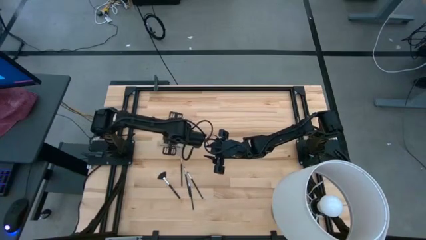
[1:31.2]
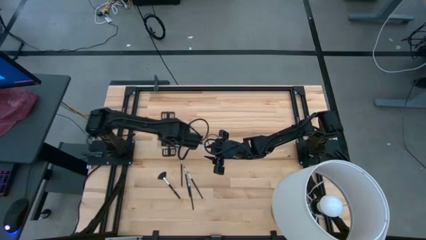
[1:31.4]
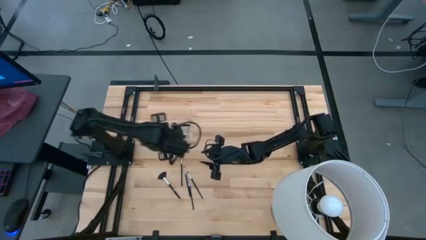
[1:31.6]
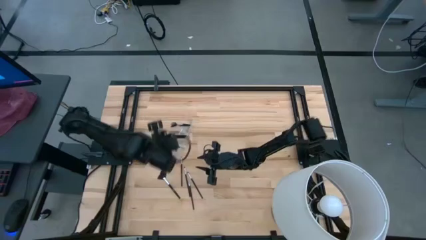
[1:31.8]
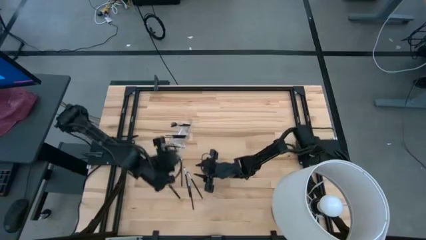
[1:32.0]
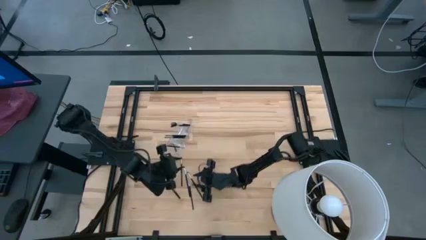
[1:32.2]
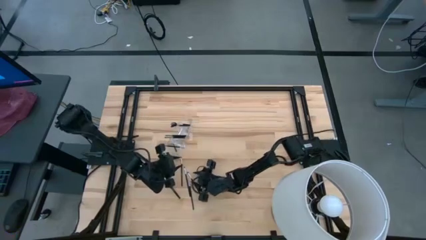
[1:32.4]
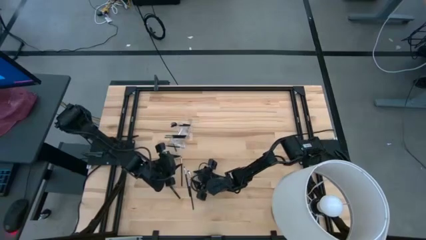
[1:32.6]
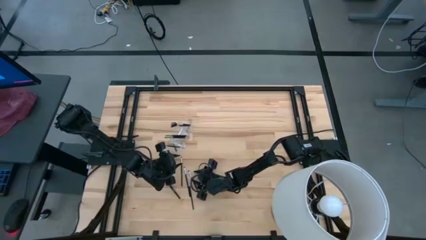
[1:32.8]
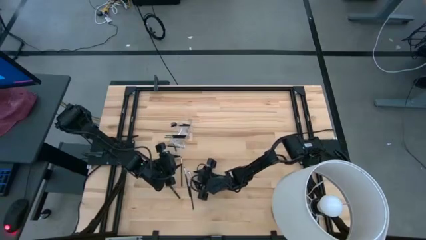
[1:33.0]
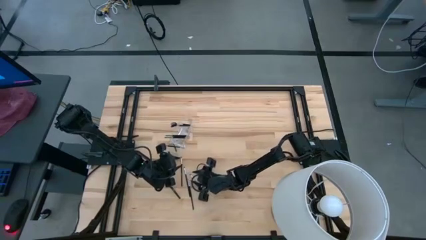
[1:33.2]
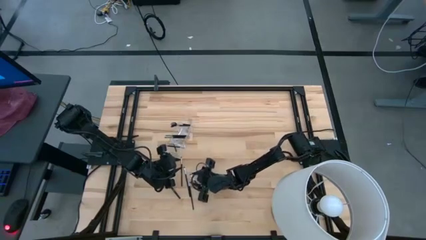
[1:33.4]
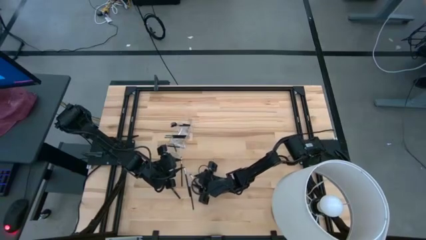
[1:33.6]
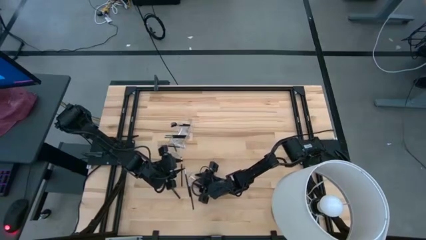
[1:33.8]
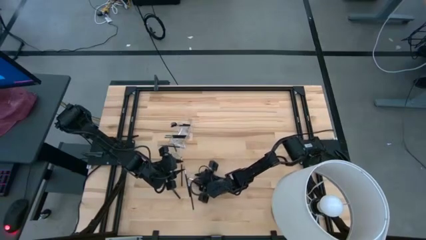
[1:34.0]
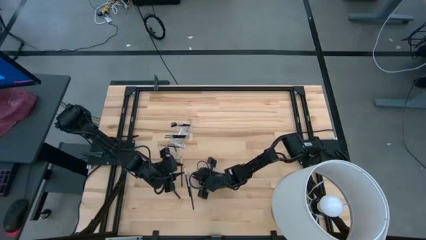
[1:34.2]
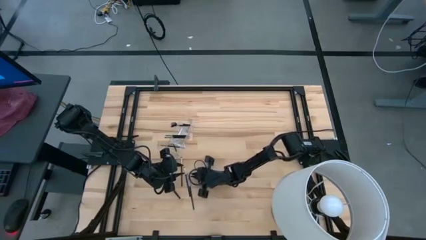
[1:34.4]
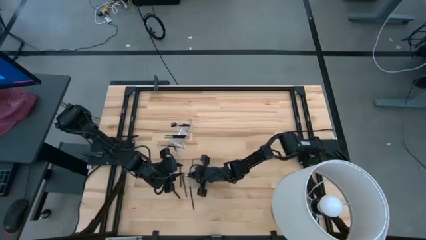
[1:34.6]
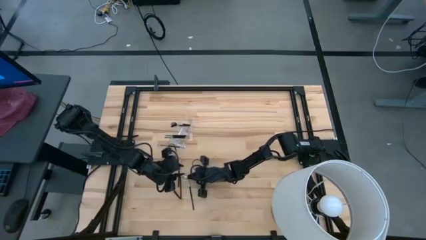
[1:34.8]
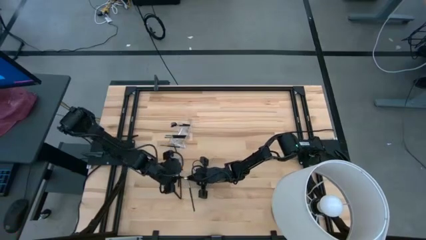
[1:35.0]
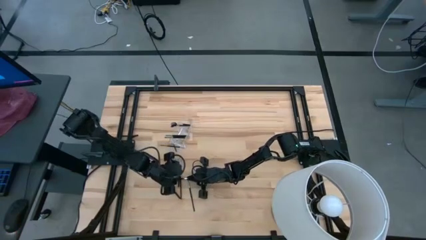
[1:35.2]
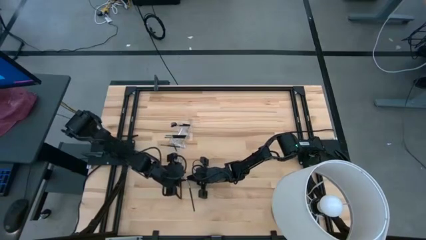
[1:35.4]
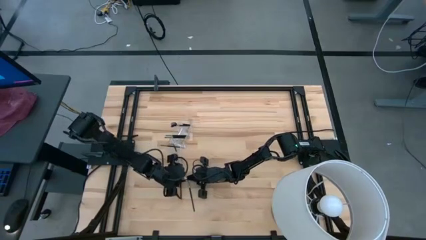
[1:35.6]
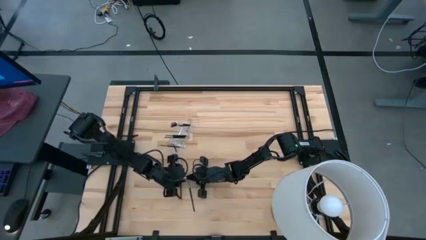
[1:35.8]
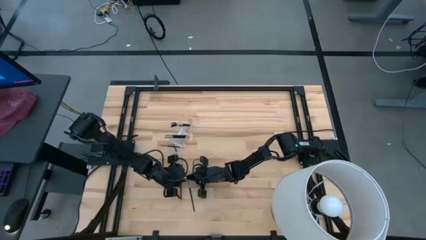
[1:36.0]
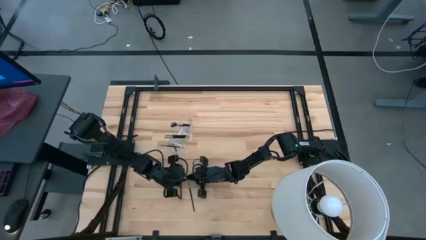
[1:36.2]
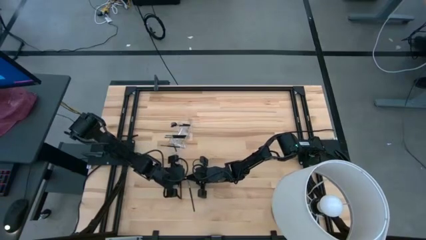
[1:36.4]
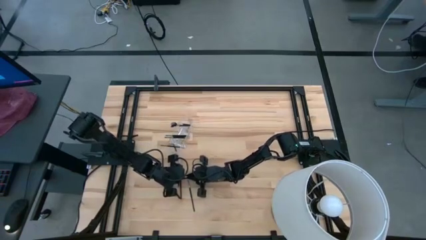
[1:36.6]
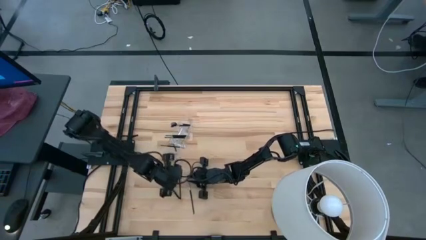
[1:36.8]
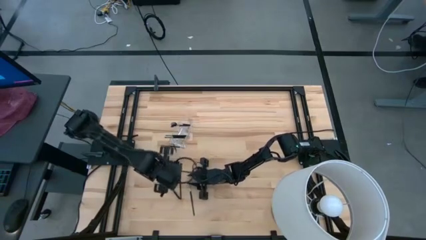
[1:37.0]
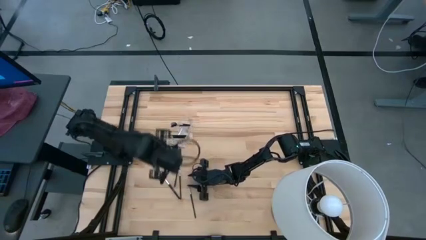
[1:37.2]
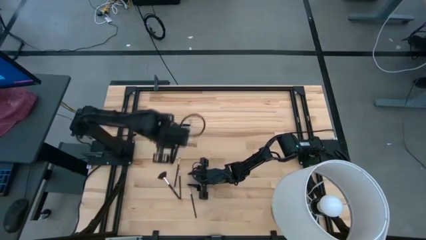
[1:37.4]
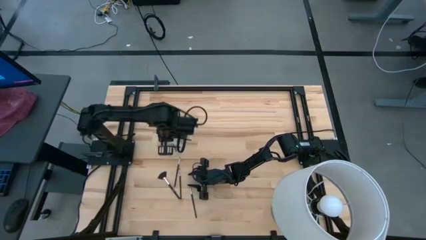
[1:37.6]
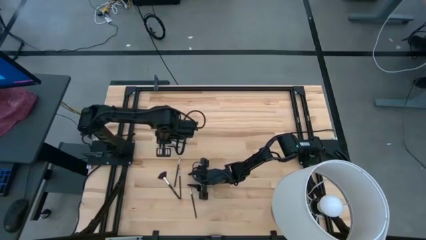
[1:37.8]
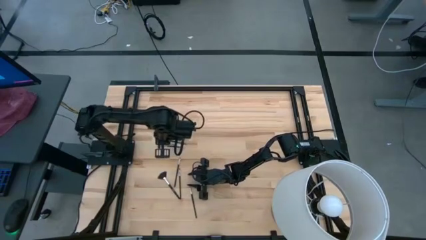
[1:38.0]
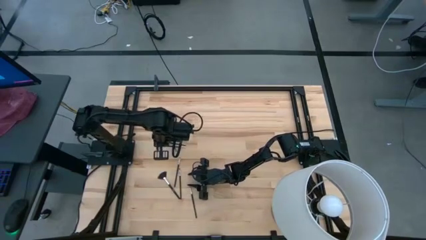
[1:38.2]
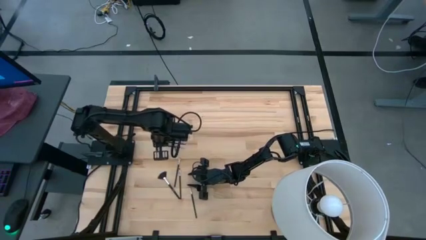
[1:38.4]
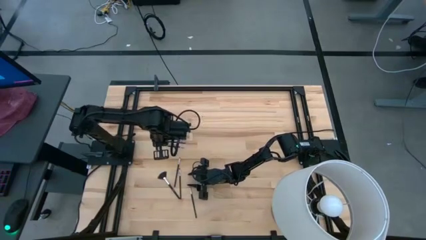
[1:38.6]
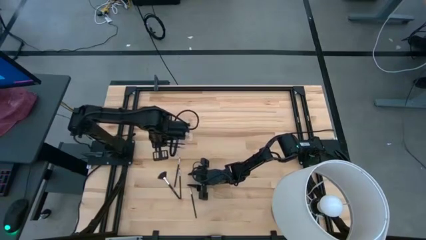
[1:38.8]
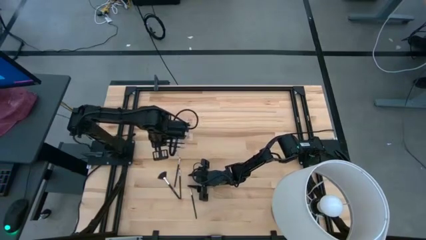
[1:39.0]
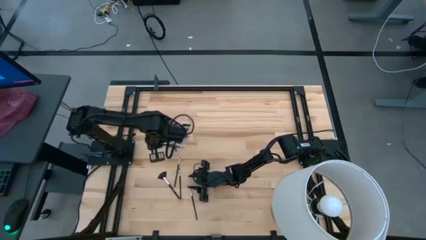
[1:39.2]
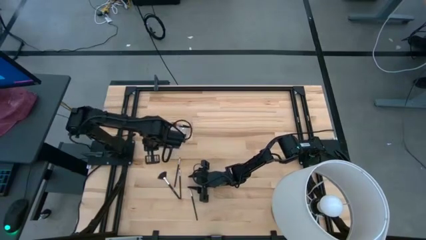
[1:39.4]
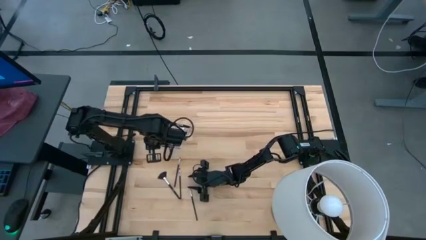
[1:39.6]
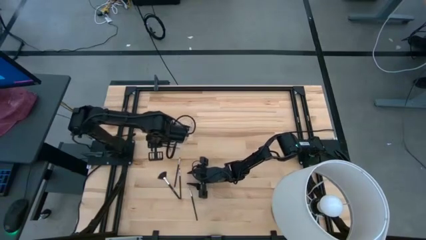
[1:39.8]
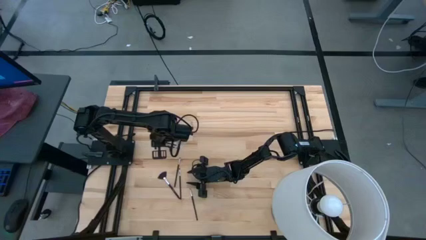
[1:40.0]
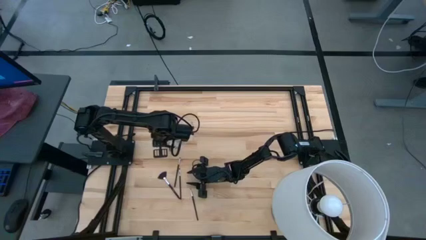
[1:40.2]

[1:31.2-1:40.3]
Task: Put items in baskets/containers
Put the eyeshadow brush into the right section of the transparent organizer

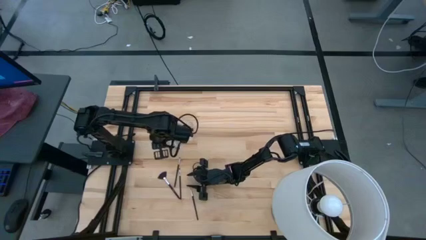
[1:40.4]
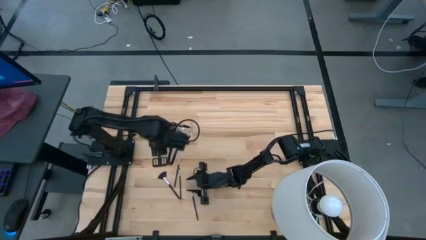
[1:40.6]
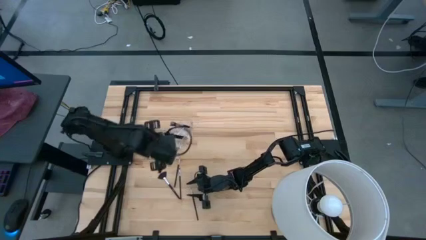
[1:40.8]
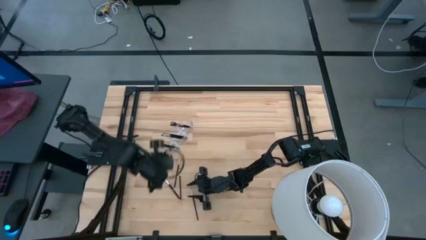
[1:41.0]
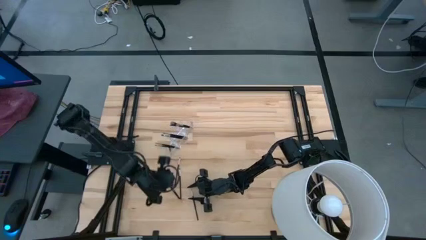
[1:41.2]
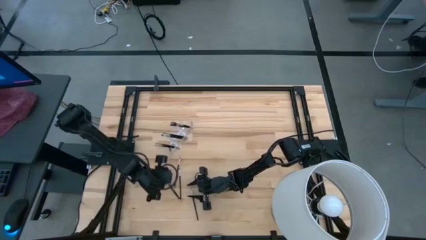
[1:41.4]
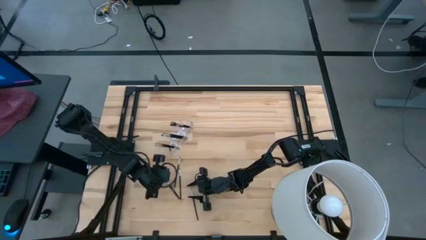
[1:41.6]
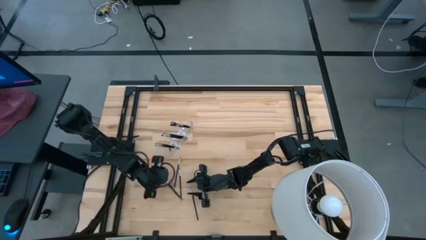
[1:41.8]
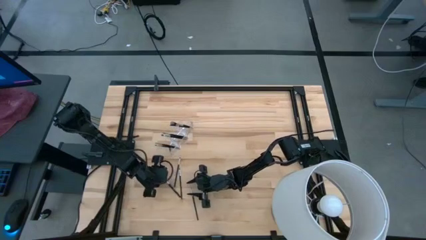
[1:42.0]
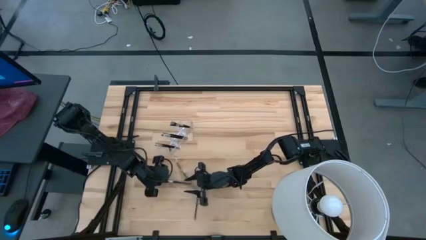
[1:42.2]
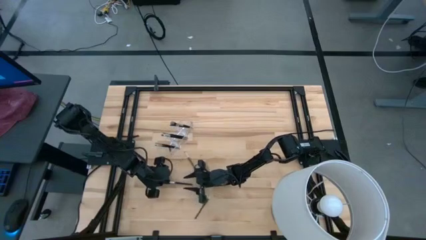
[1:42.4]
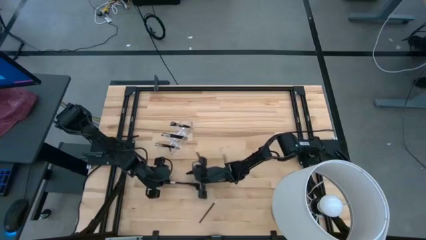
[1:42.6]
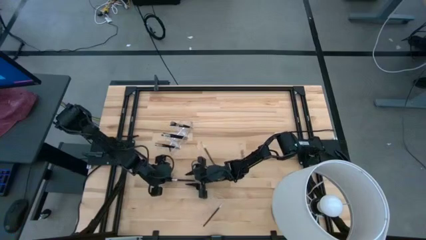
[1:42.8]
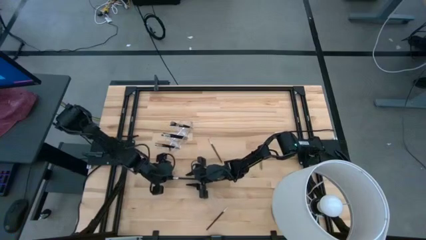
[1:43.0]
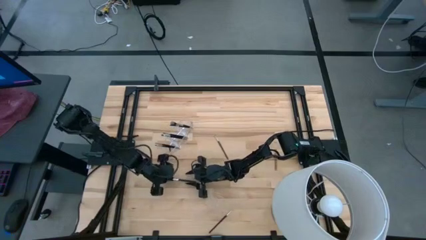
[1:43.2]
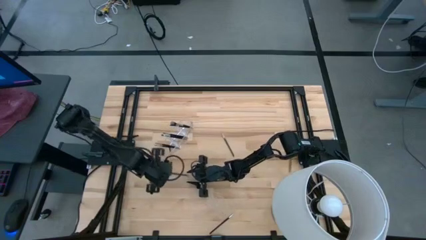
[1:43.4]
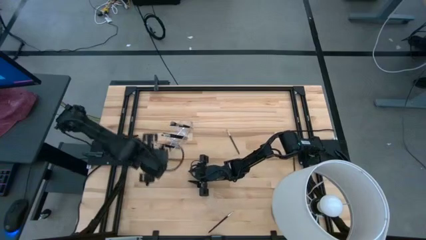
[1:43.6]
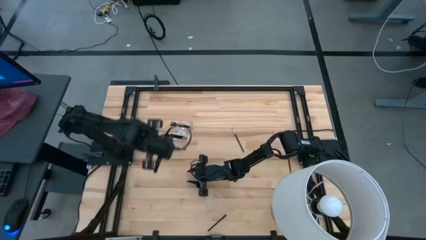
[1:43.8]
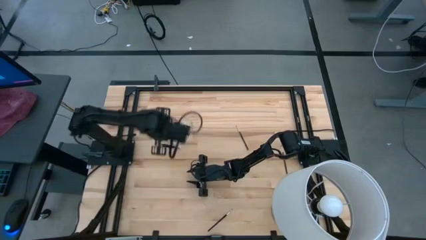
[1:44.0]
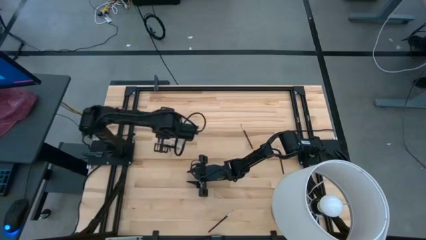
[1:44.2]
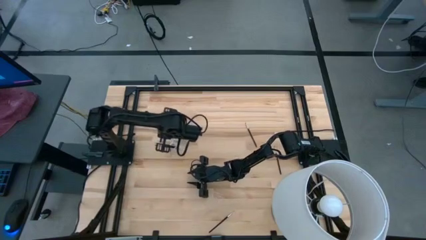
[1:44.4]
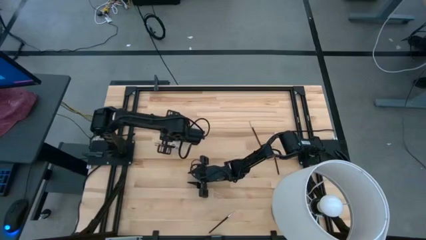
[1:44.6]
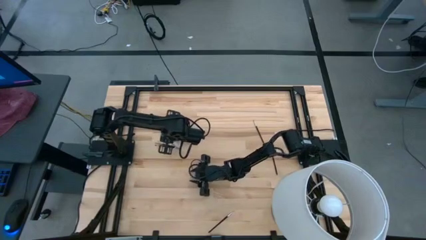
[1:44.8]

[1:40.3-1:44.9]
Put the highlighter brush into the middle section of the transparent organizer

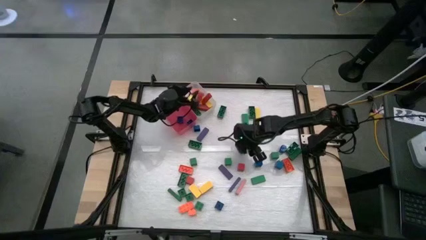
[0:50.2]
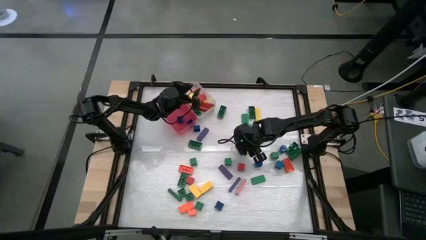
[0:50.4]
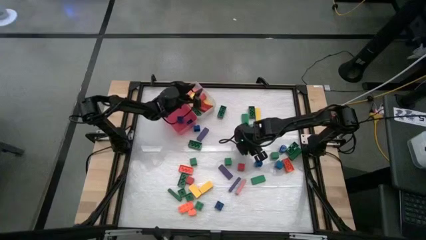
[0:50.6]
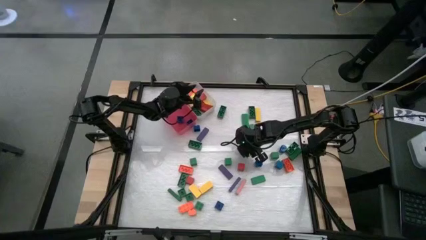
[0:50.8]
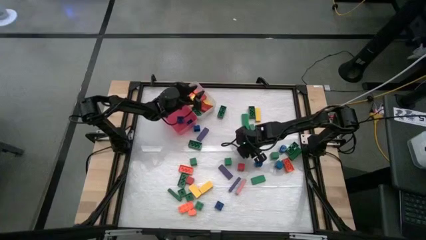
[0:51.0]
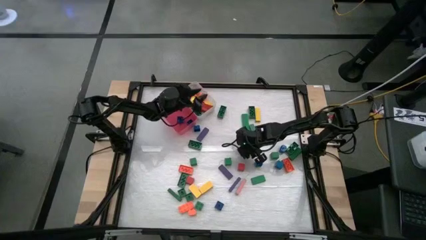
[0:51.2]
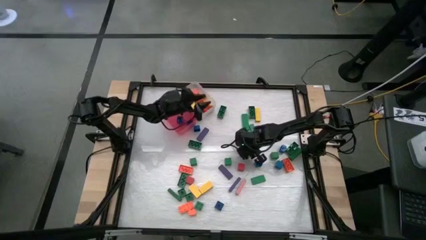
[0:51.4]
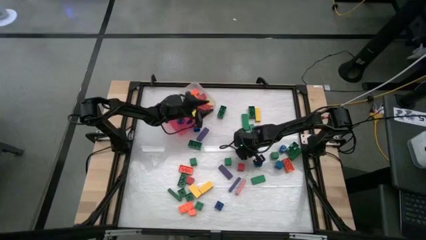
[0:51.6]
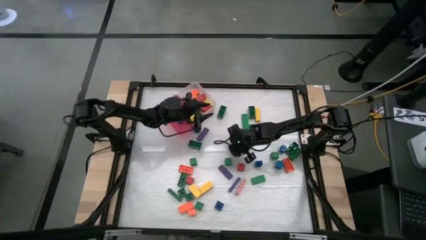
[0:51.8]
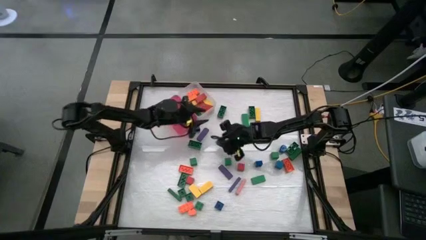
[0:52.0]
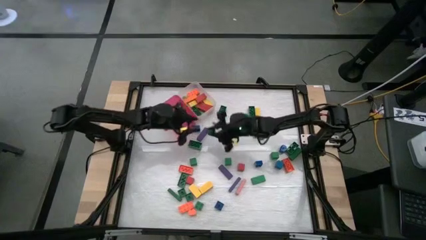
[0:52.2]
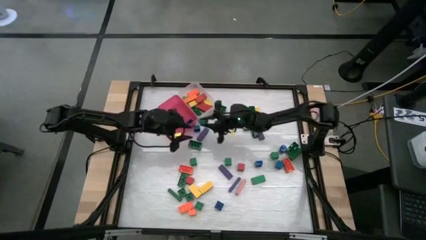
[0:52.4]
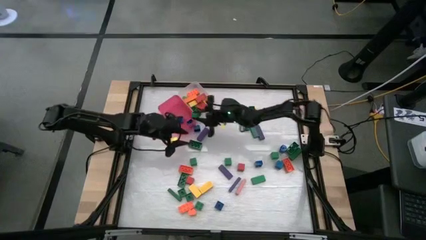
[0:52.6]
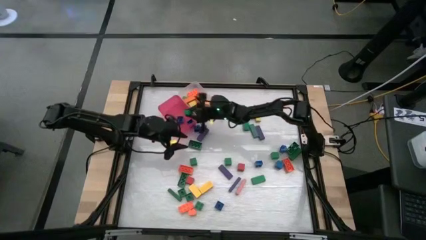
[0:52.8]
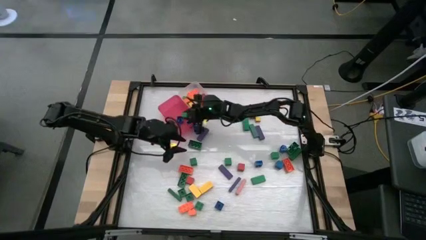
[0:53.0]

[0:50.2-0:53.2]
Task: Sort blocks by size
Put the small green game piece into the pink bin
